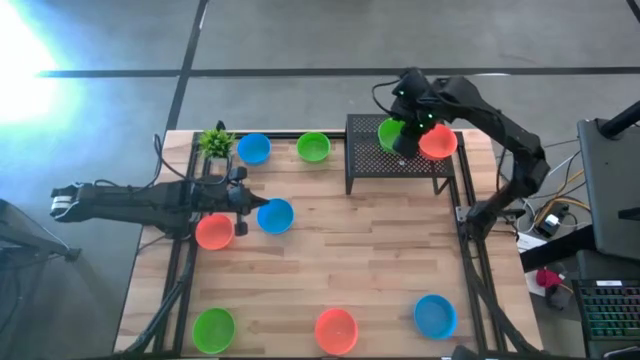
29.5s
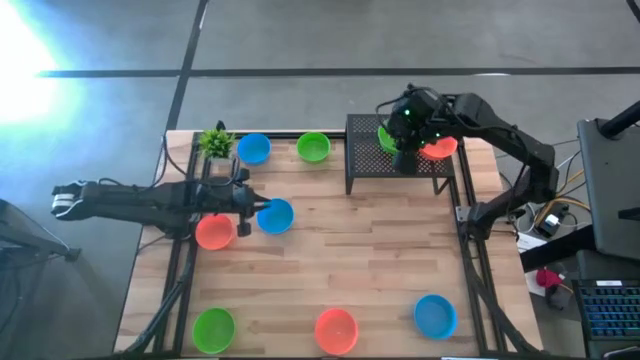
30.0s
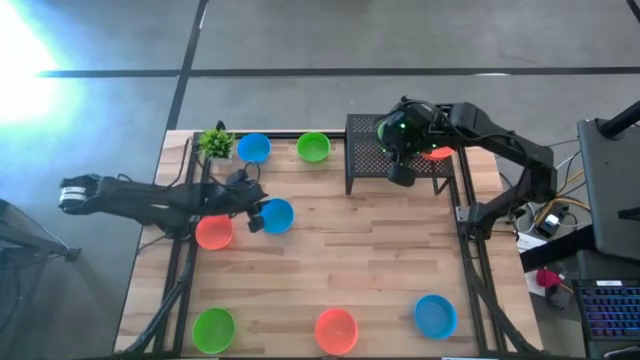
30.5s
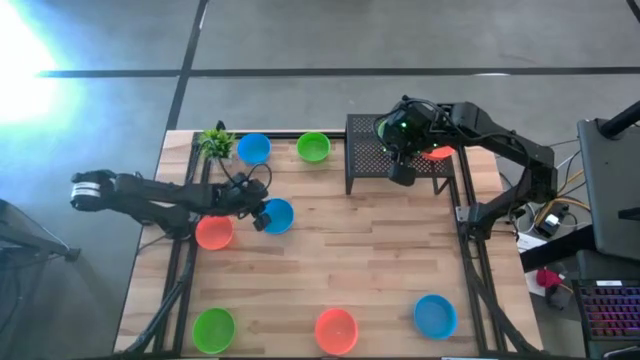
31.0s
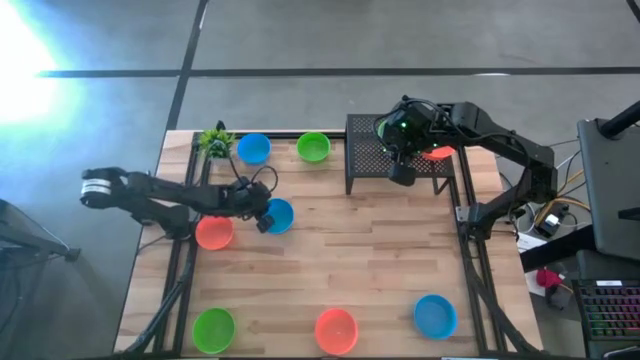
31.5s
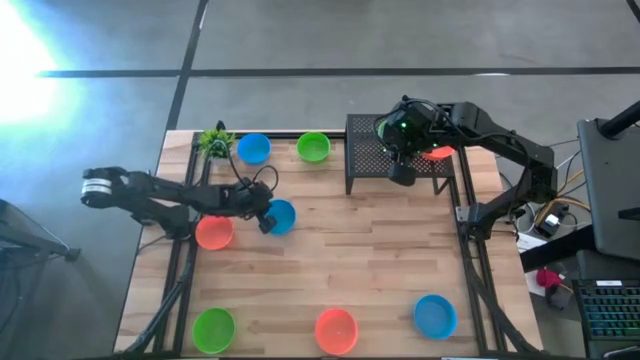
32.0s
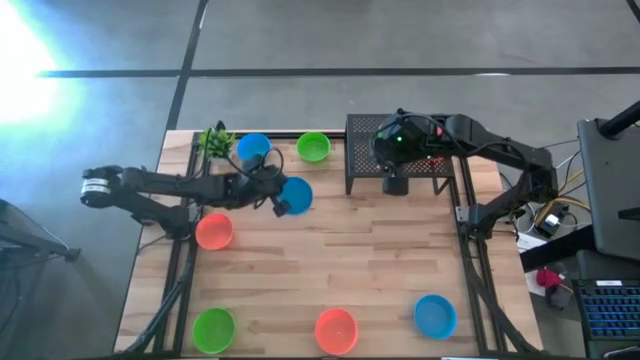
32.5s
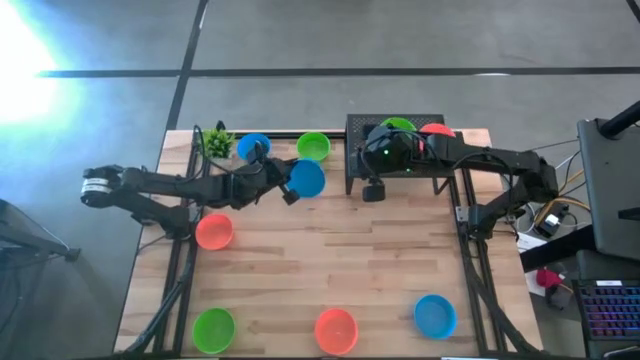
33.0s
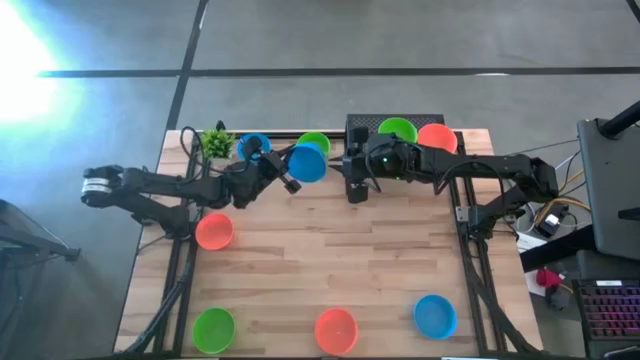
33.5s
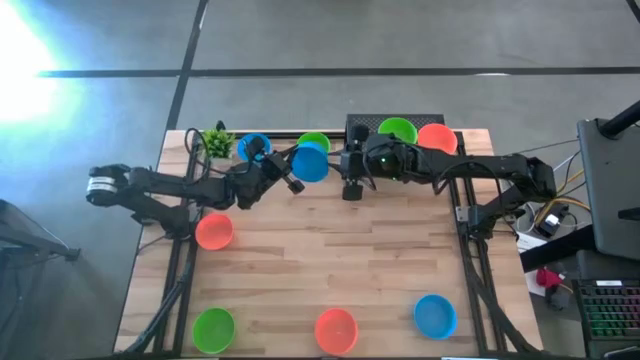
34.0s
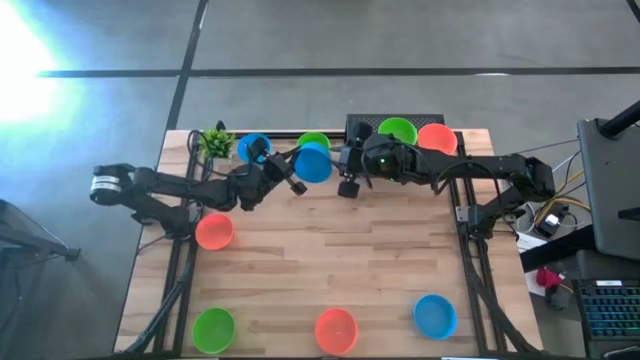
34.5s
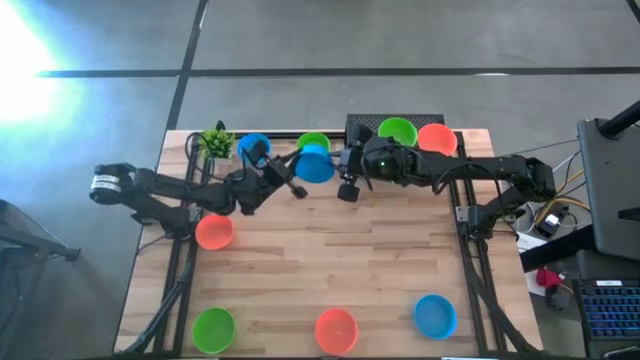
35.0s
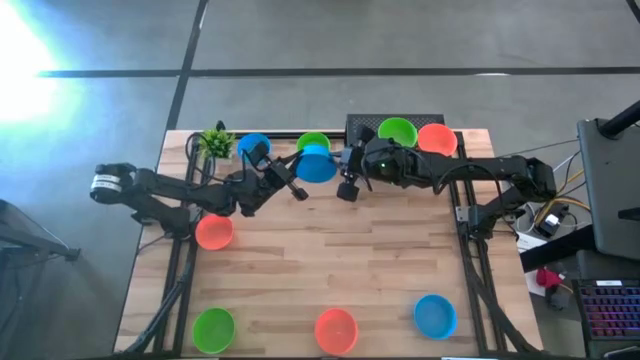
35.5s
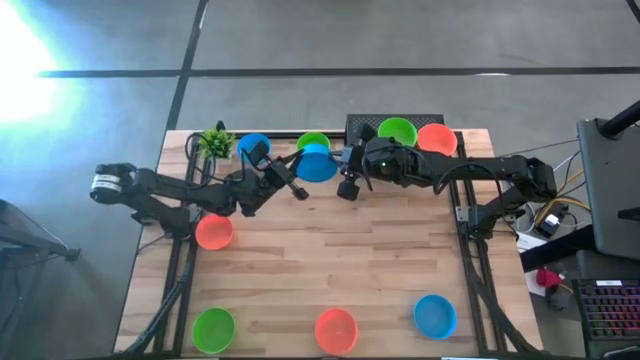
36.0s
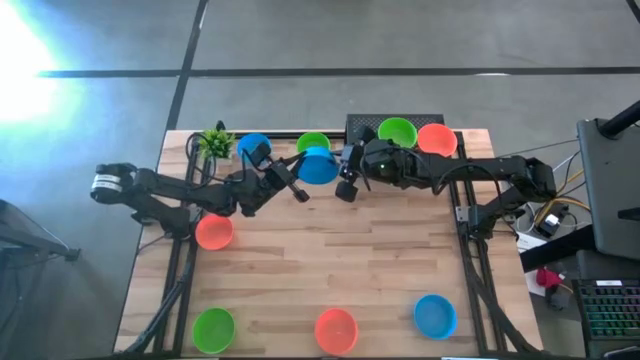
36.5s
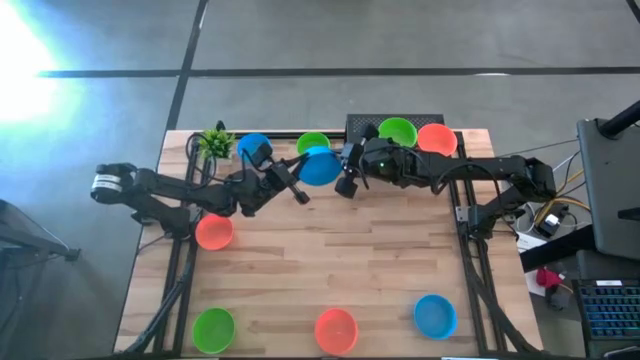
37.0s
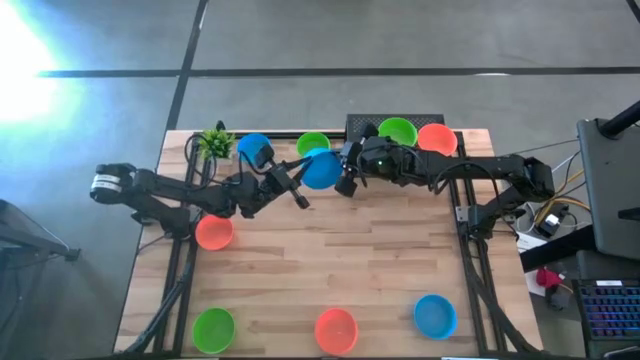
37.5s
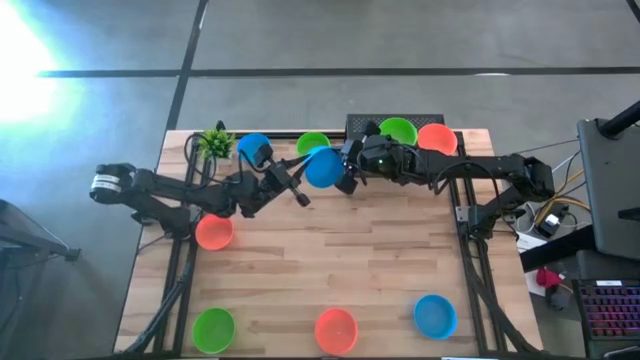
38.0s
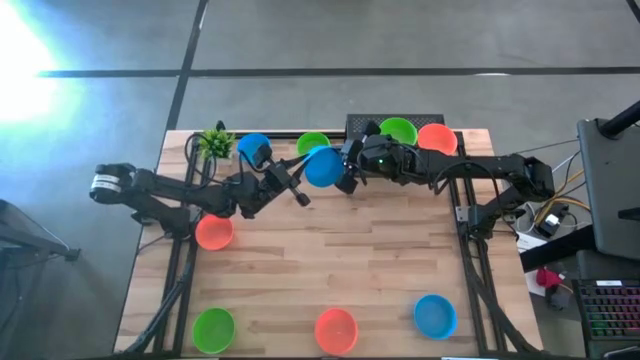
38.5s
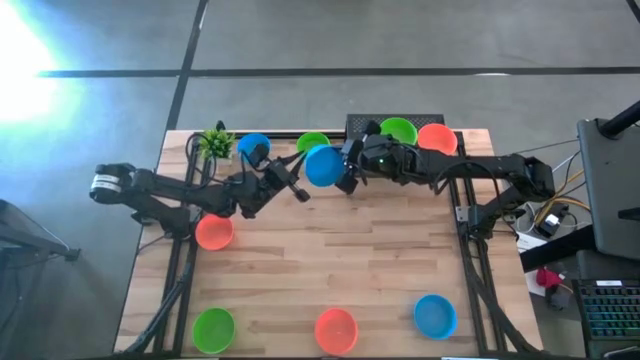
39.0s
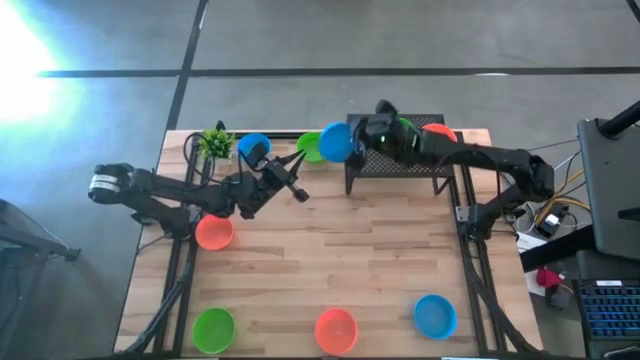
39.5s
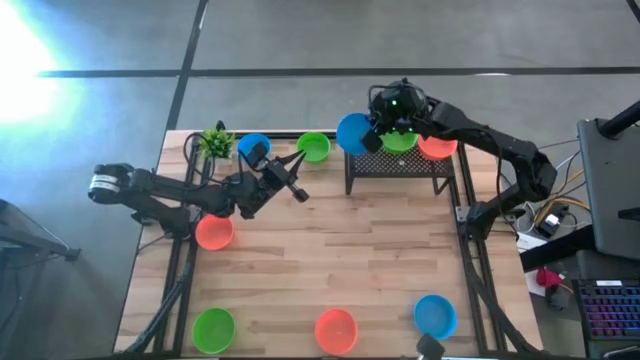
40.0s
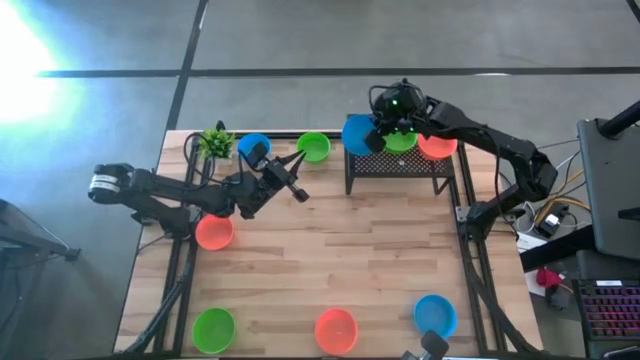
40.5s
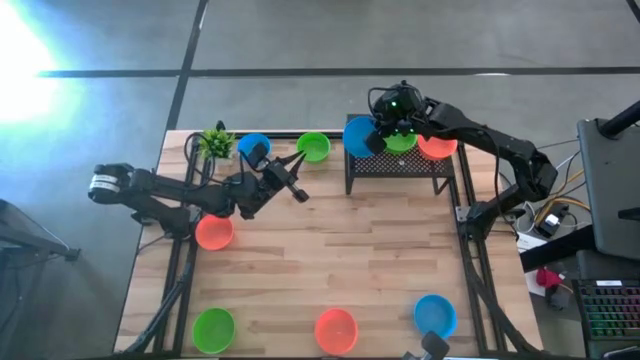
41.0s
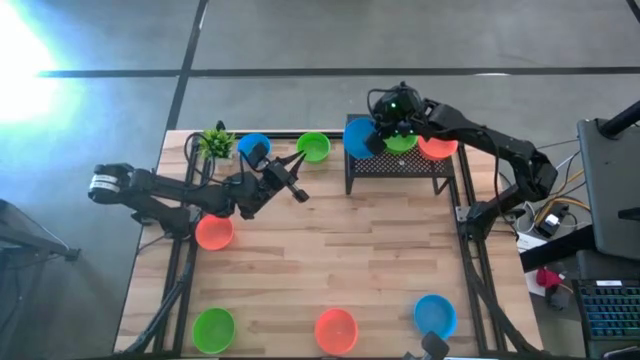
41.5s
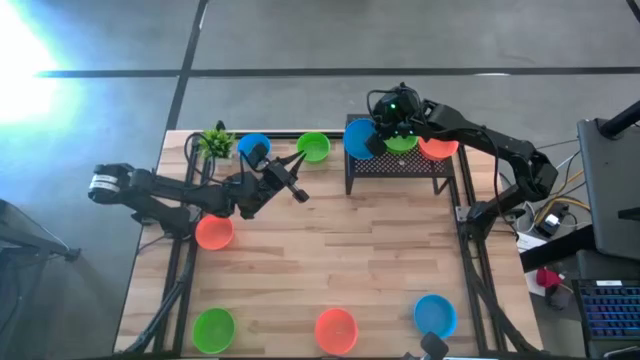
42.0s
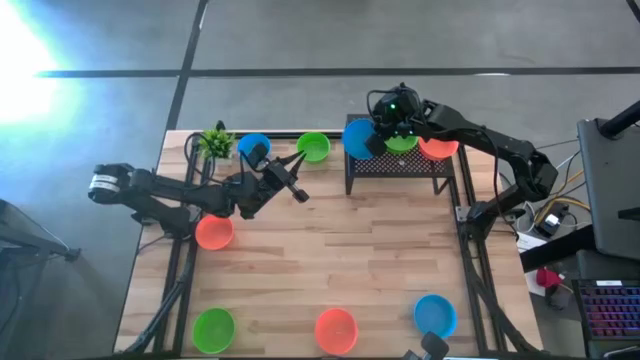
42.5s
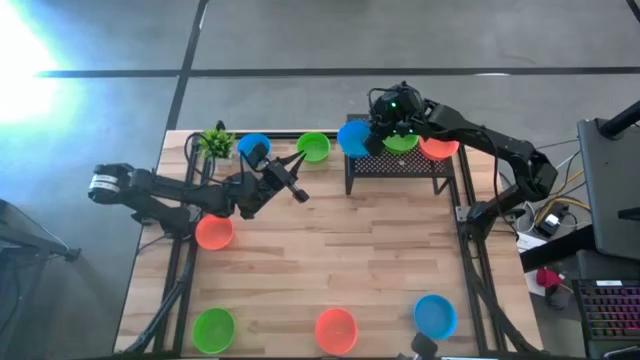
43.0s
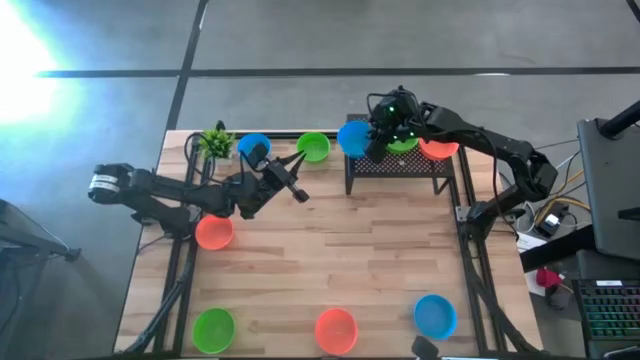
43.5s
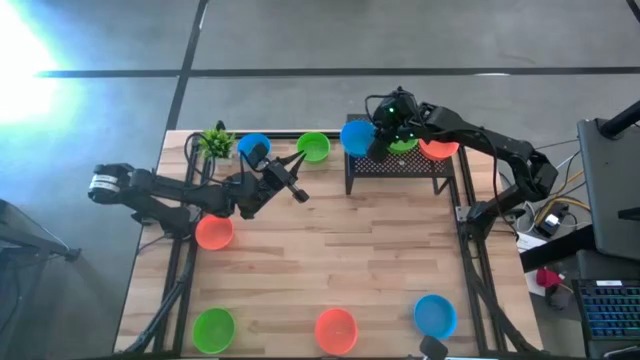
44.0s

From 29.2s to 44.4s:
Task: Pick & Place Mini bowls
Put the middle blue bowl on the shelf

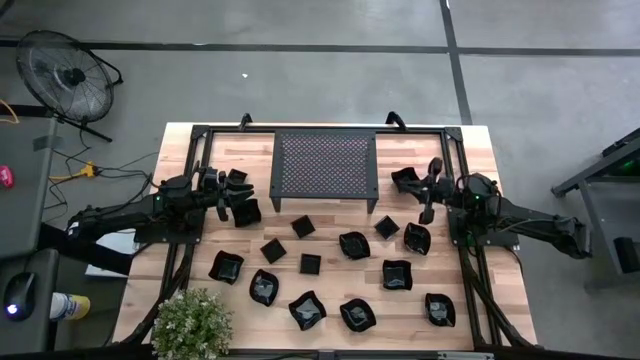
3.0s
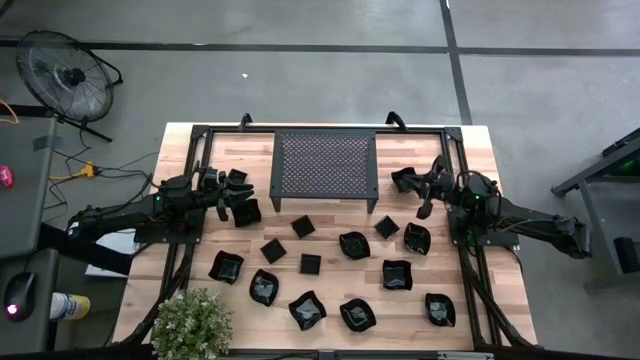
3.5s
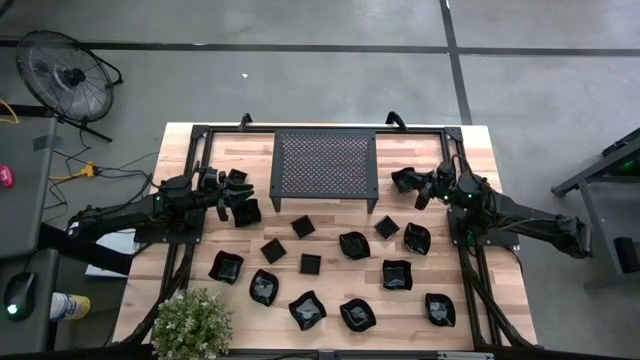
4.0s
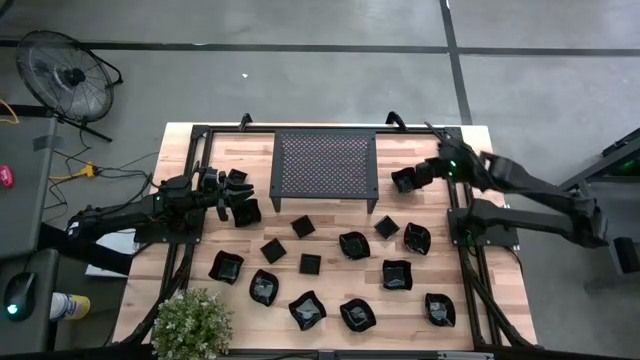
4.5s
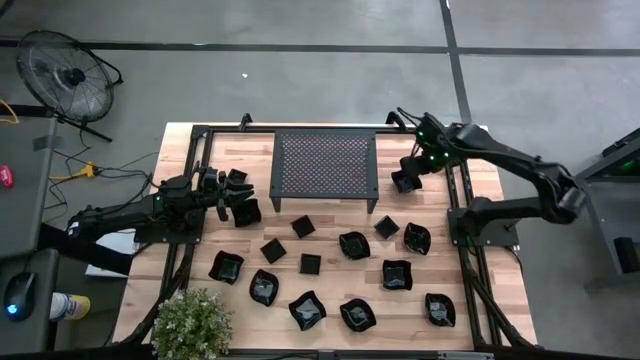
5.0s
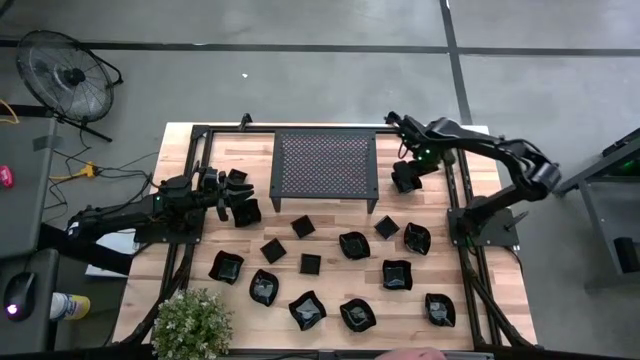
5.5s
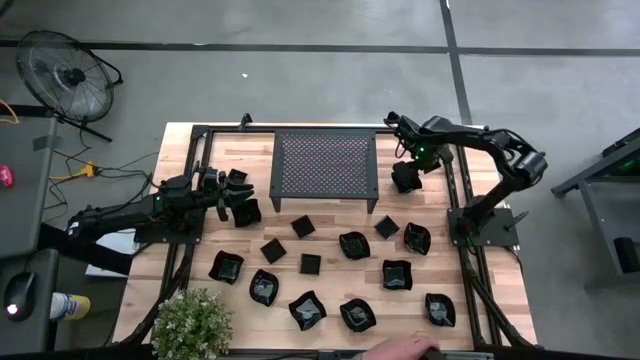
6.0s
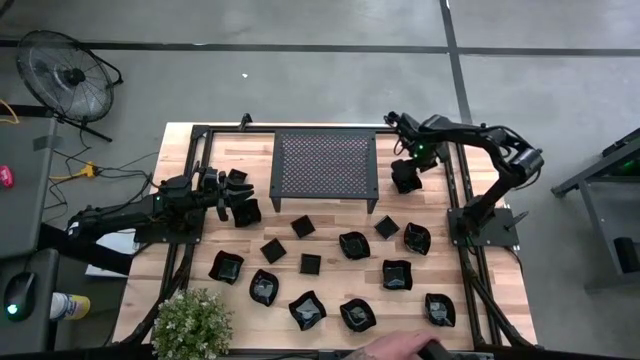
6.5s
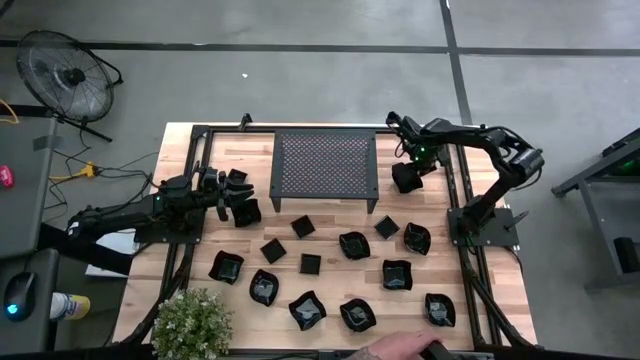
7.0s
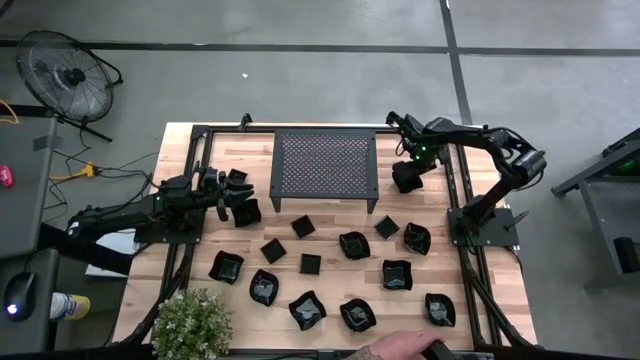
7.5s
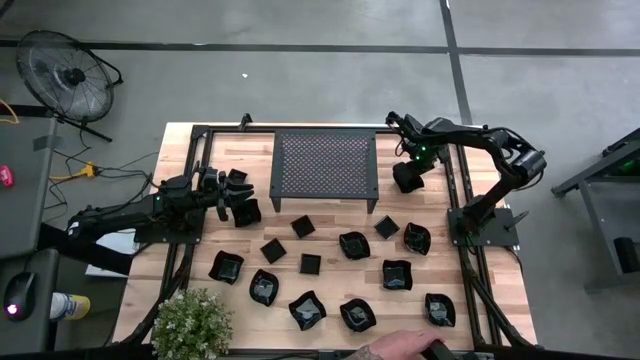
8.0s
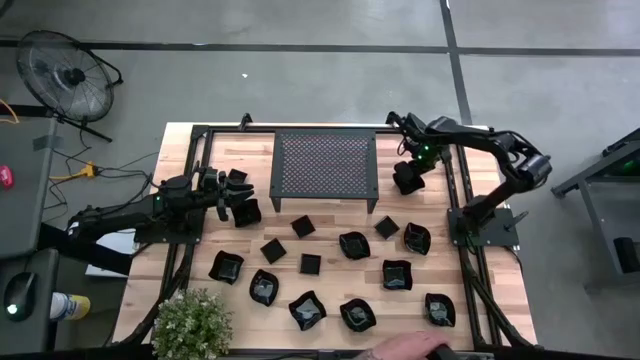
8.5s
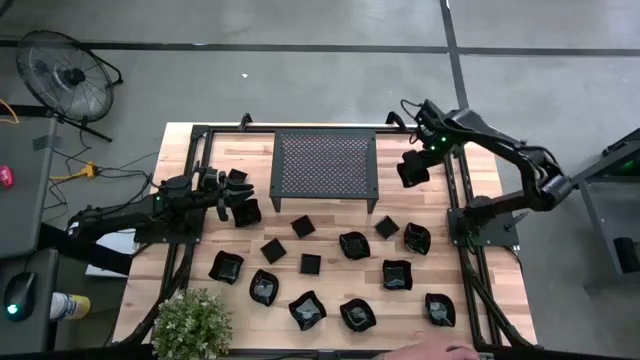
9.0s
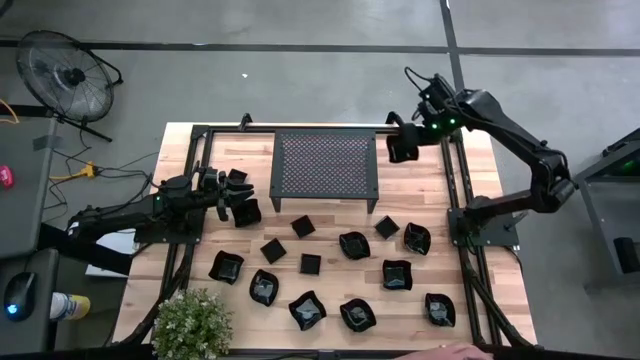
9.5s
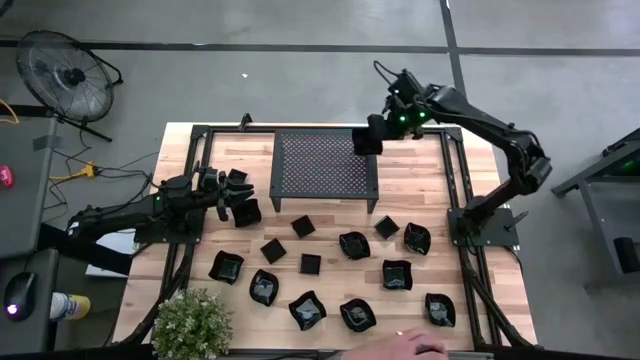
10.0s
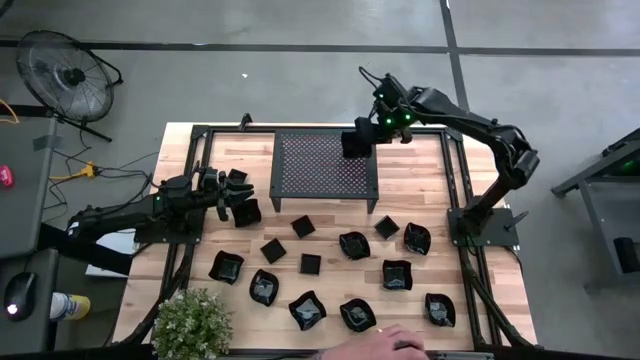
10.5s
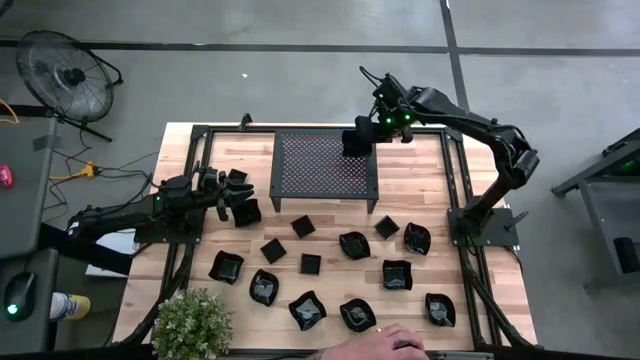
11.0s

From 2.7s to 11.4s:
Task: Pick & Place Mini shaped plates
Put the black distorted square plate on the shelf
